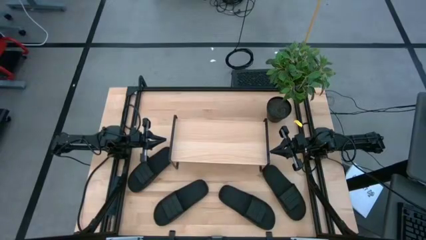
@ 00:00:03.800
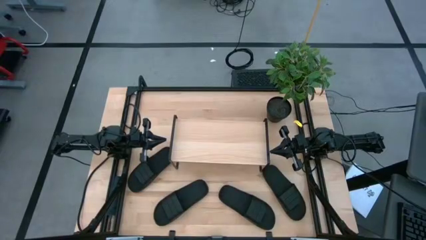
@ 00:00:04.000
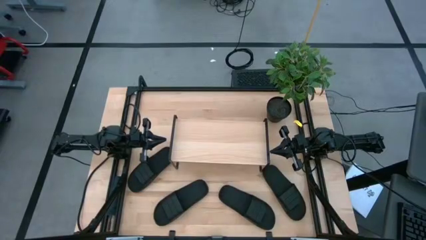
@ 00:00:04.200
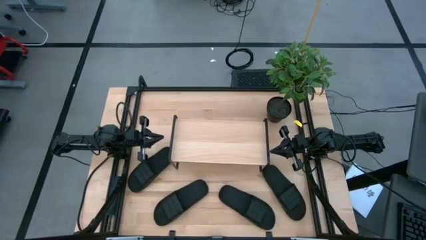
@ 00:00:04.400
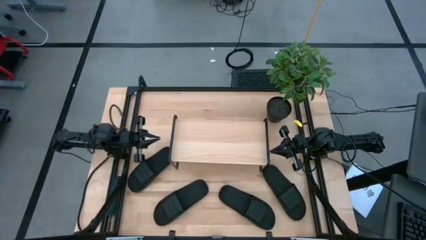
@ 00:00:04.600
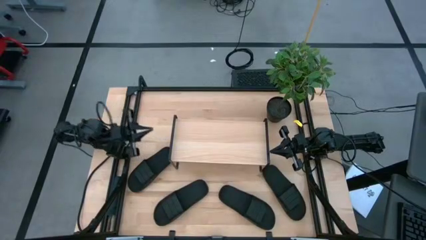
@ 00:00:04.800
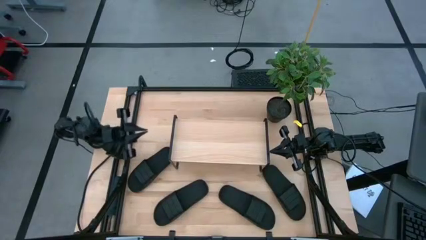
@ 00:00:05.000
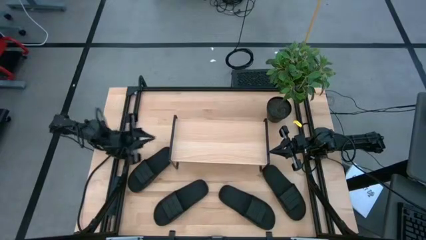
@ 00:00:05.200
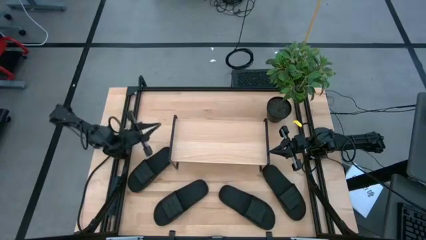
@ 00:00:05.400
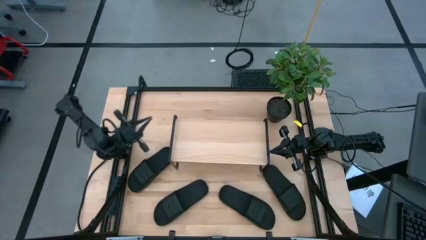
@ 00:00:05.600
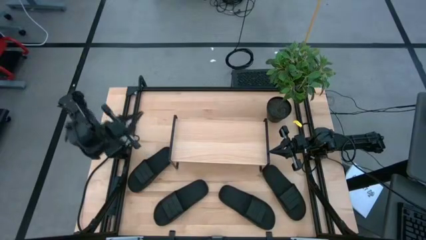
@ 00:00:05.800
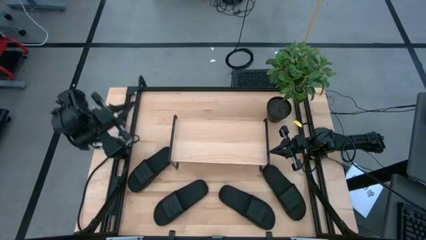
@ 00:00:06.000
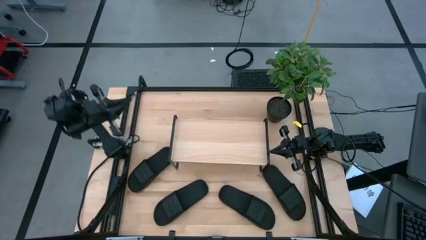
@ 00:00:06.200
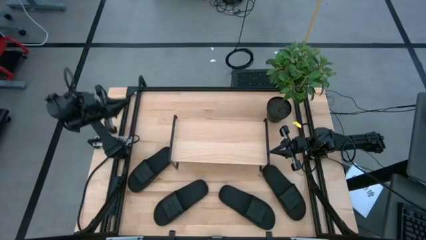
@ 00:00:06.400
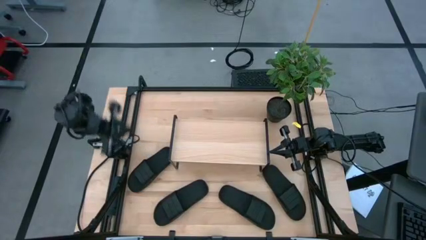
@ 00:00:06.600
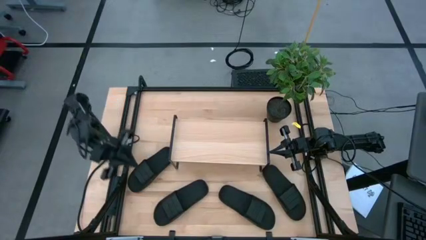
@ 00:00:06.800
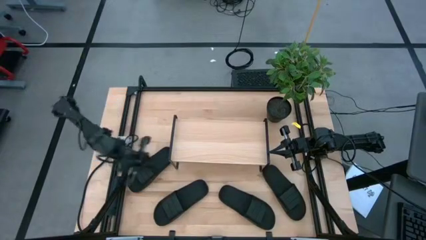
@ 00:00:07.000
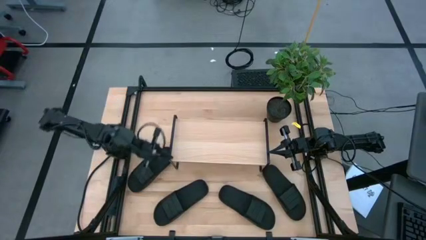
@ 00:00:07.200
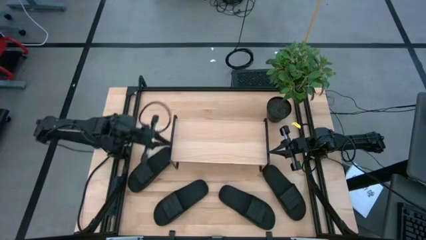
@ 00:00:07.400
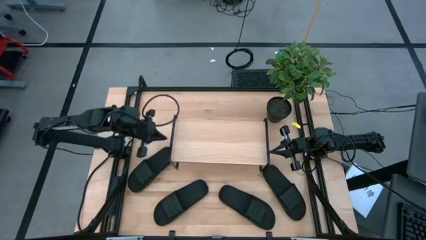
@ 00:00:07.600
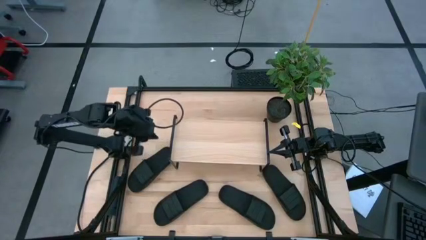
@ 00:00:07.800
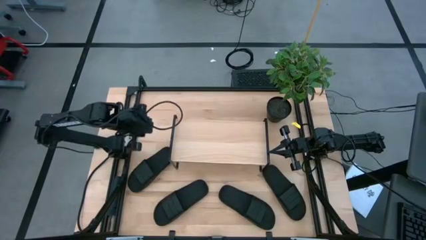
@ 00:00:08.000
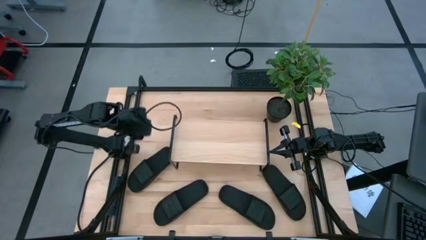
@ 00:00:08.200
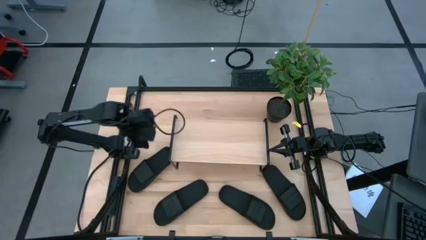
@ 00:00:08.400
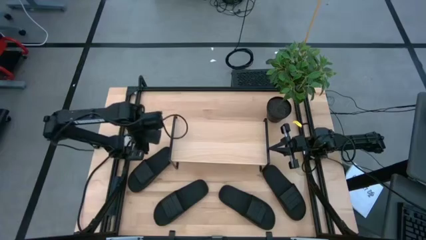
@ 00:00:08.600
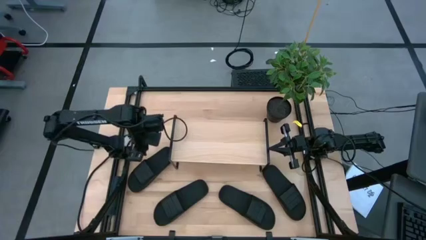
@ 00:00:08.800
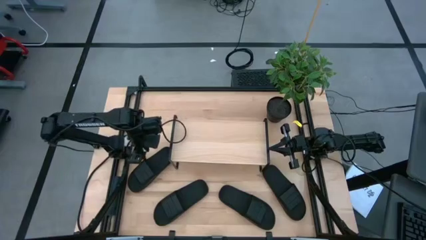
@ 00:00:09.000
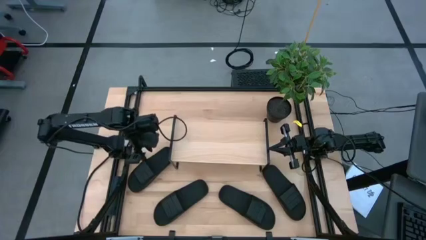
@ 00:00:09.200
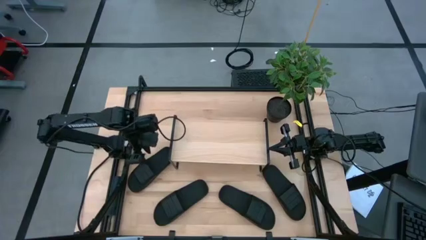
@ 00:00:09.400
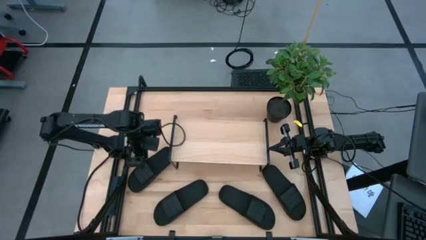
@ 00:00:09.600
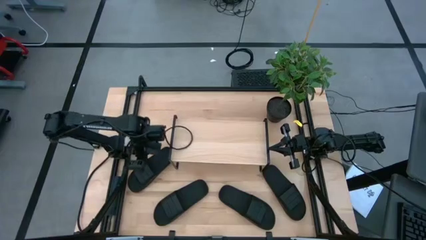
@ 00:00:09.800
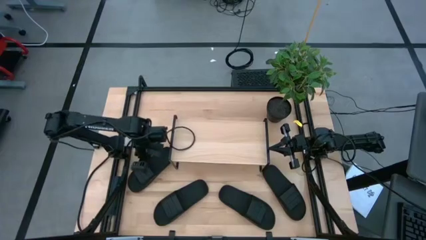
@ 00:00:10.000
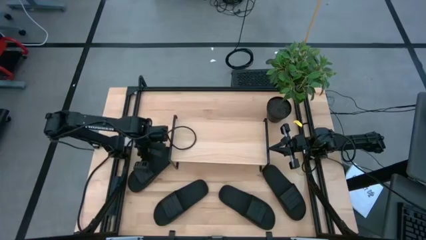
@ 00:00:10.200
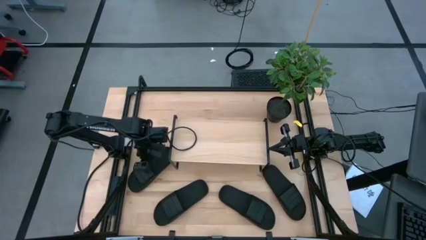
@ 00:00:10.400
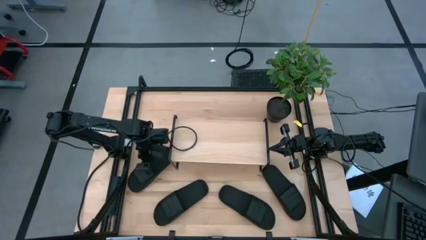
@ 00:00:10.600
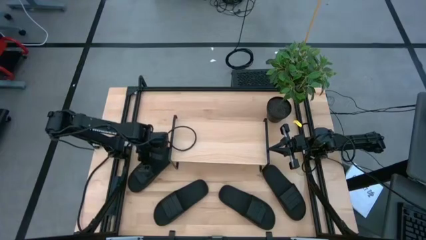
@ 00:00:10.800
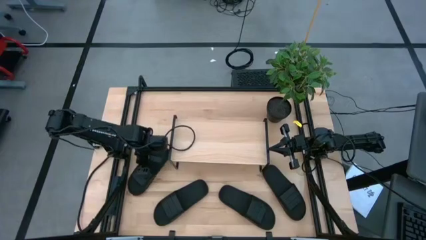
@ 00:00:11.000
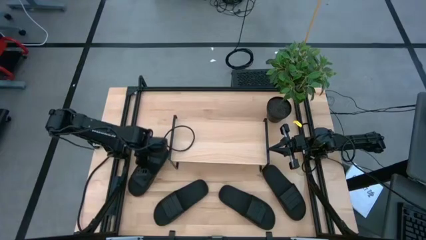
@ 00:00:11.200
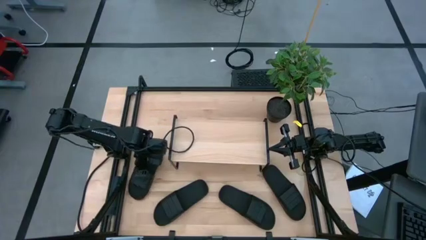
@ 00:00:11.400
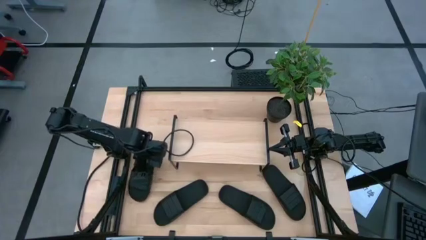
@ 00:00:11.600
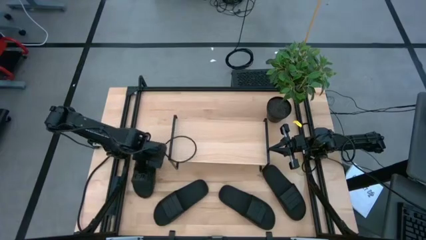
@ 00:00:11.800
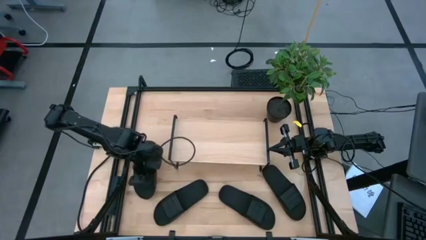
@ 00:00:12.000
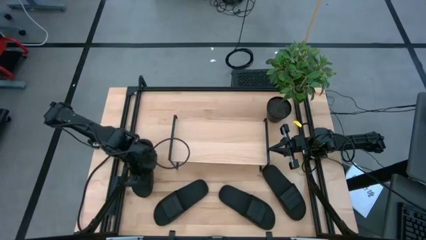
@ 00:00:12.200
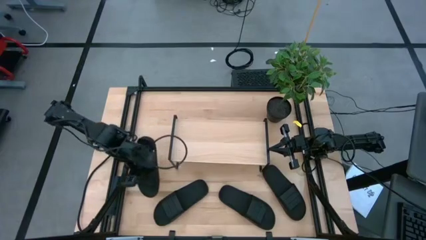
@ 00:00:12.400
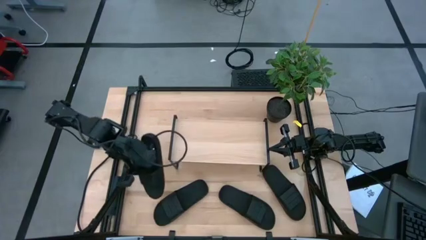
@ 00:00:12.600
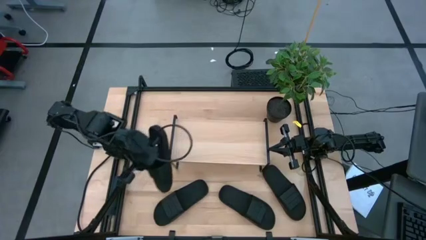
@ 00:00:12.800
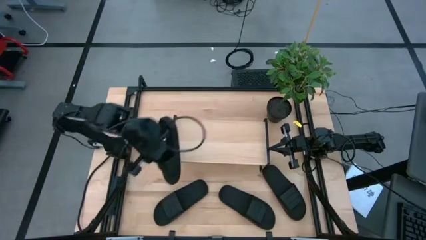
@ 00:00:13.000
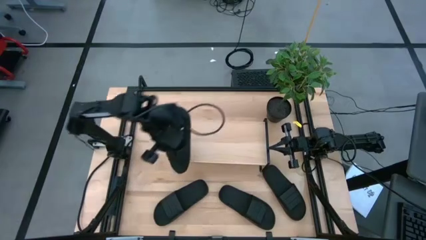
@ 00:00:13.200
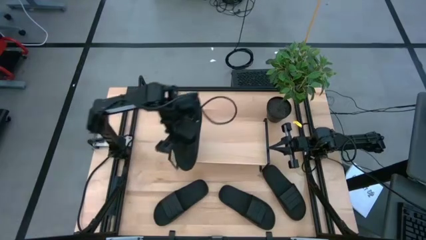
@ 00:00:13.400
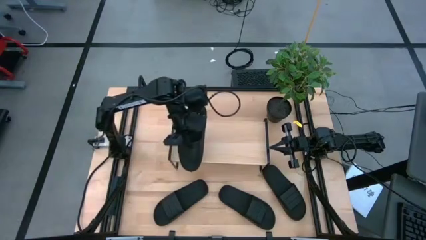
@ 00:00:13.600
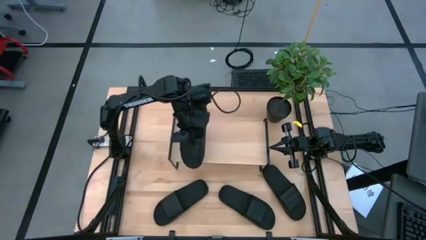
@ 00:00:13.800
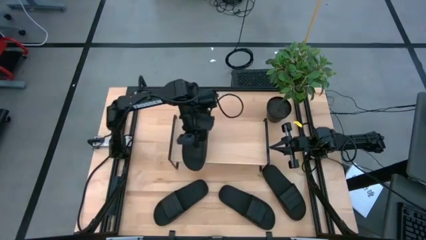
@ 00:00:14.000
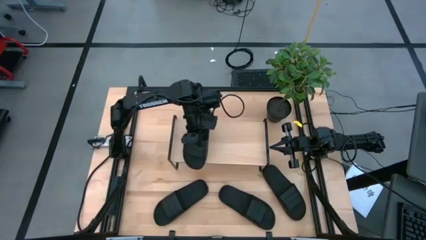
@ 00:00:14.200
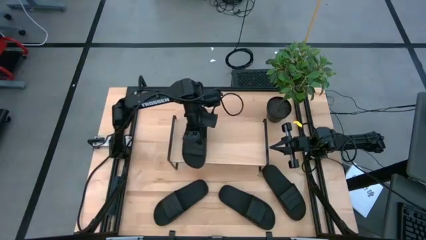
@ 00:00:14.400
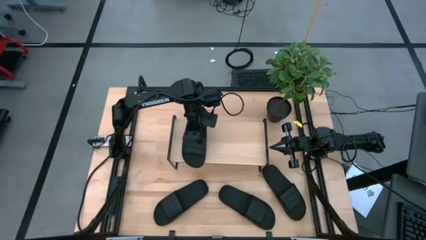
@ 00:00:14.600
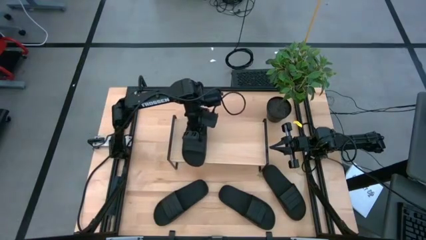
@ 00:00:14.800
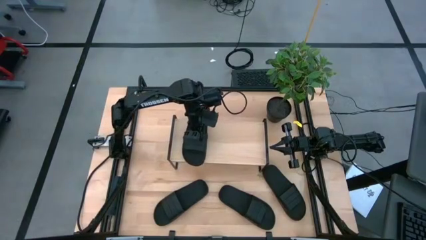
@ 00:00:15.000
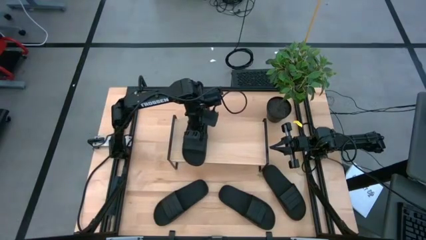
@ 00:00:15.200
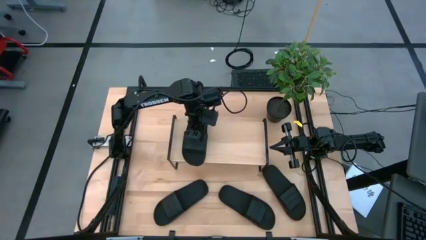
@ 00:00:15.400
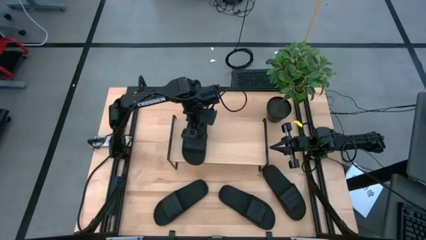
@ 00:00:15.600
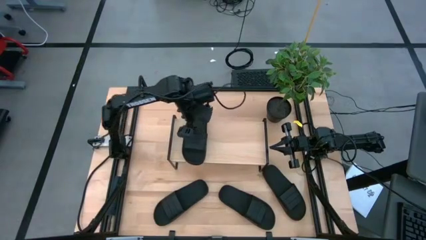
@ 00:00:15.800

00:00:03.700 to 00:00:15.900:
Task: Pick and place slides into the shelf
Put the top left black slipper on the shelf
